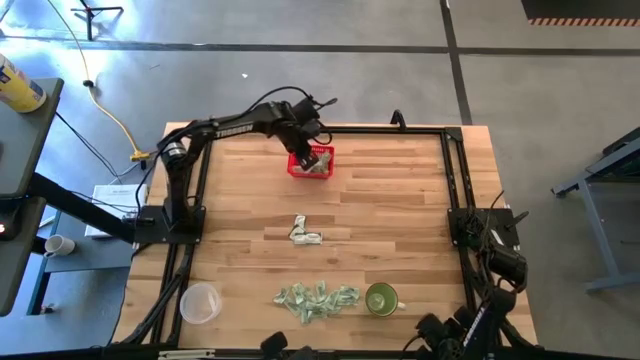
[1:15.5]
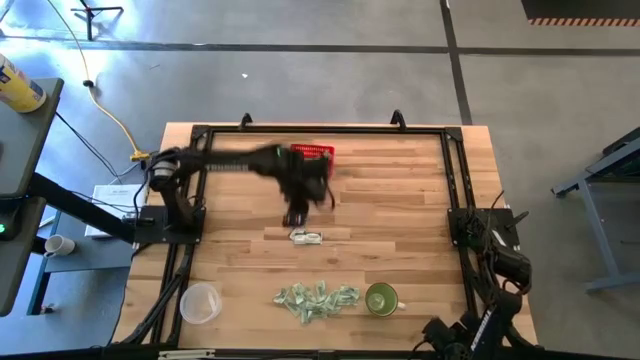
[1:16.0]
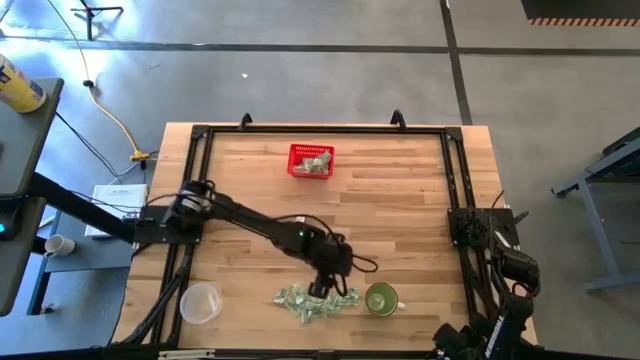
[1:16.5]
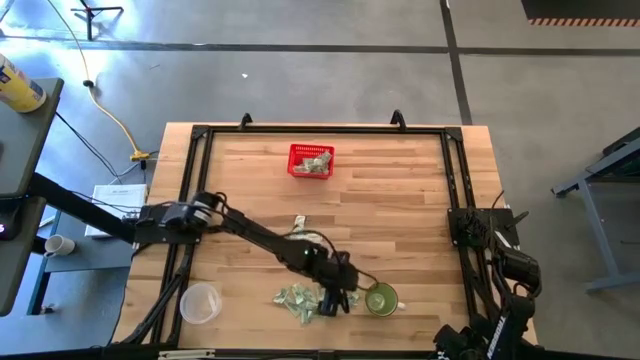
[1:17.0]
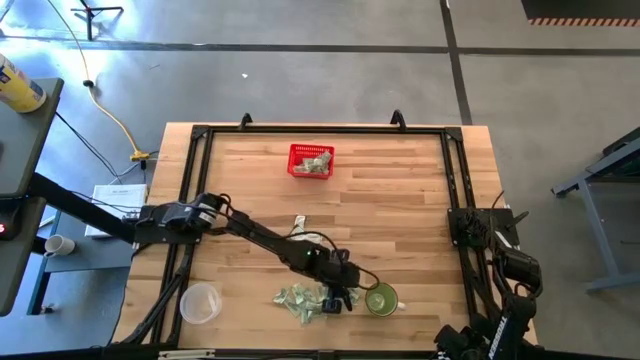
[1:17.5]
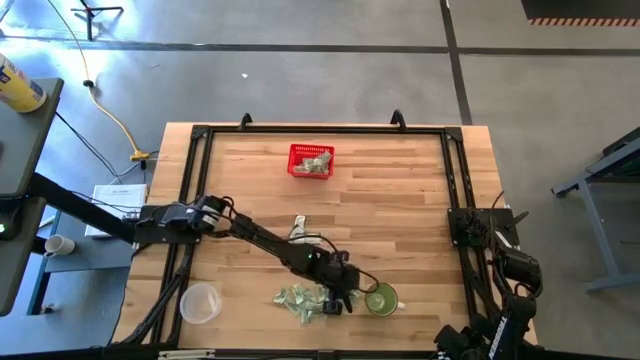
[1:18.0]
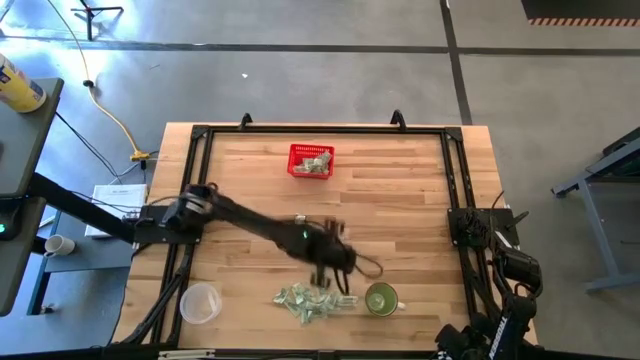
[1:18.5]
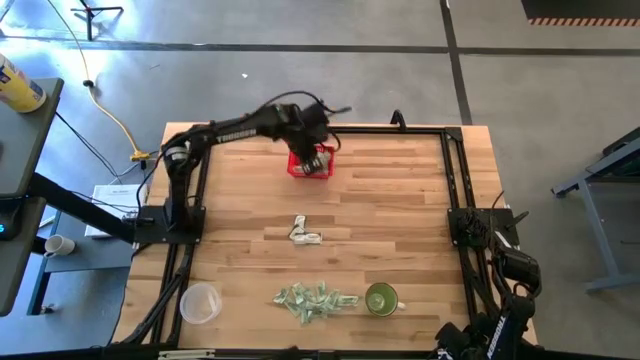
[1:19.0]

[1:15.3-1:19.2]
Task: Pick and place items into bin
Put the light green stevia packet into the red bin

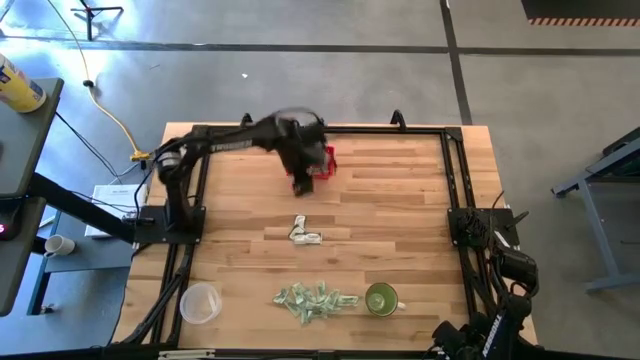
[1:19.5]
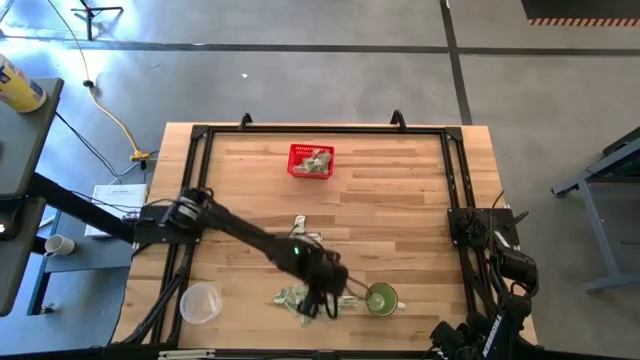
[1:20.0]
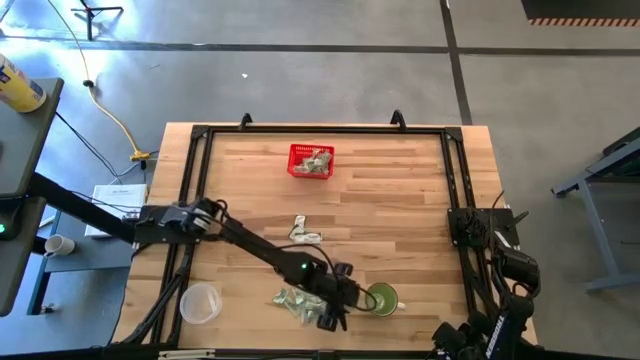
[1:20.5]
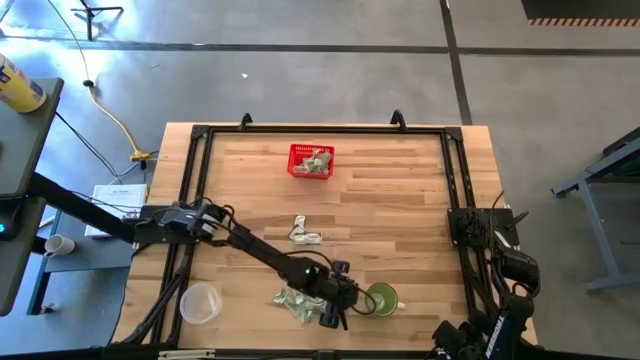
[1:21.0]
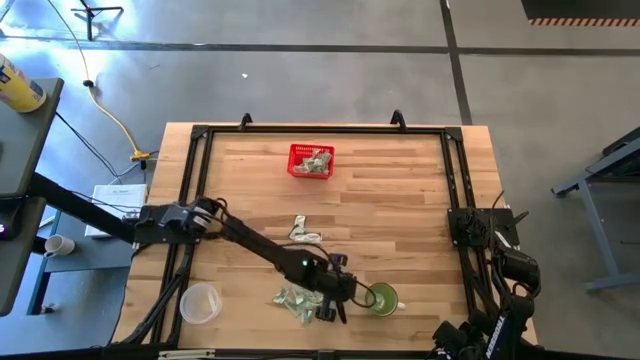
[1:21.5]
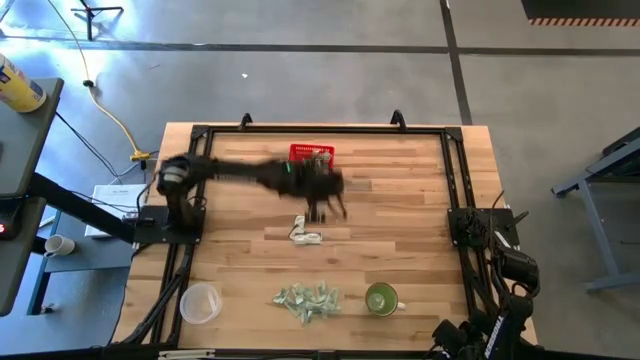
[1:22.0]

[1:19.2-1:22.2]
Put the light green stevia packet into the red bin

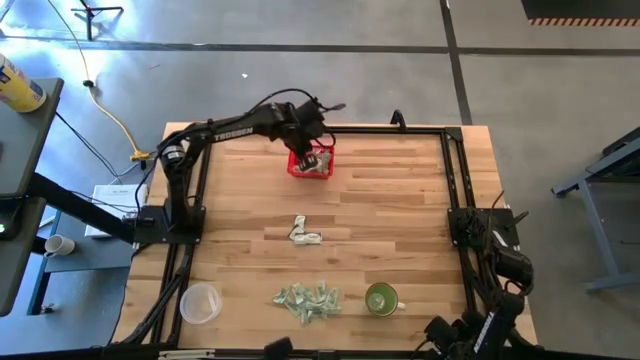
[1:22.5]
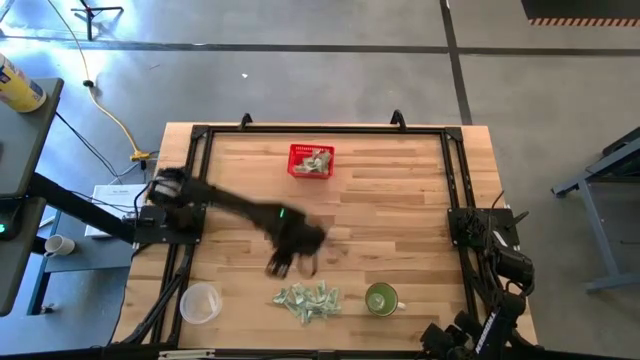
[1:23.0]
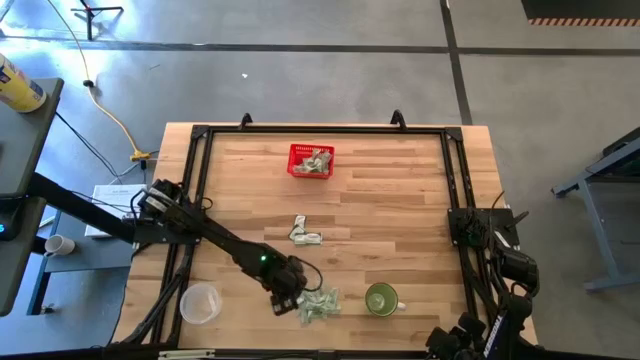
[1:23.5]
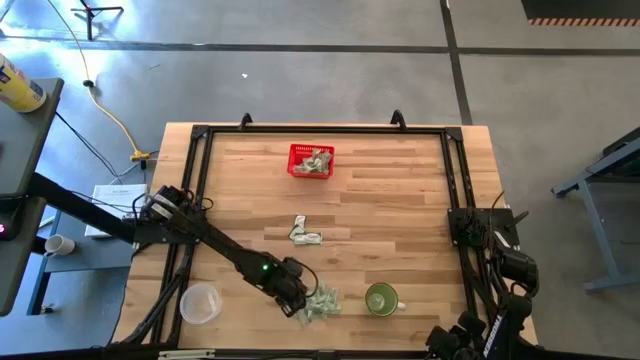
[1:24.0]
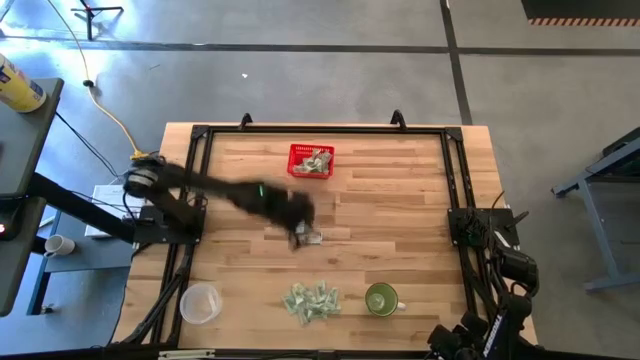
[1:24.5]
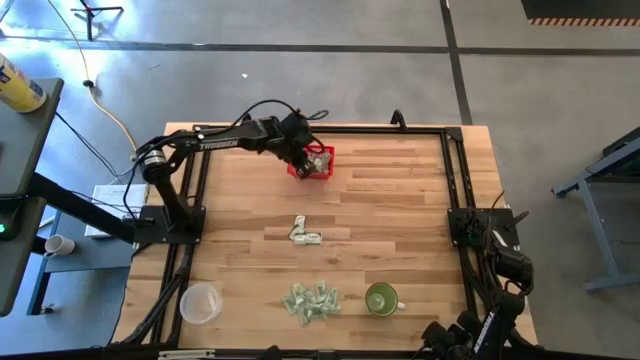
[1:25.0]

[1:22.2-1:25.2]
Put the light green stevia packet into the red bin

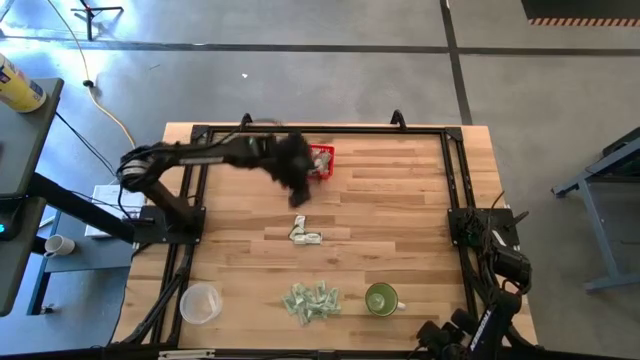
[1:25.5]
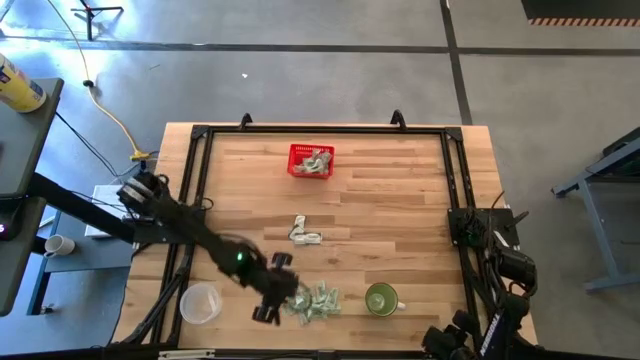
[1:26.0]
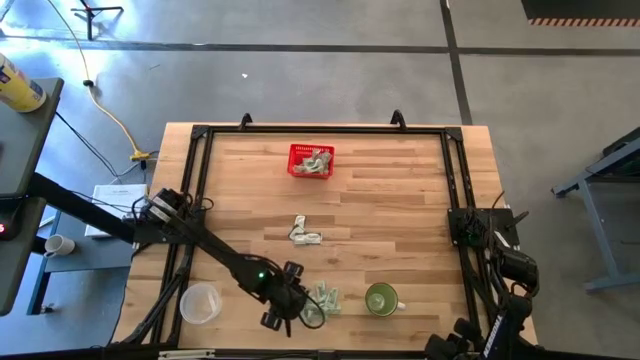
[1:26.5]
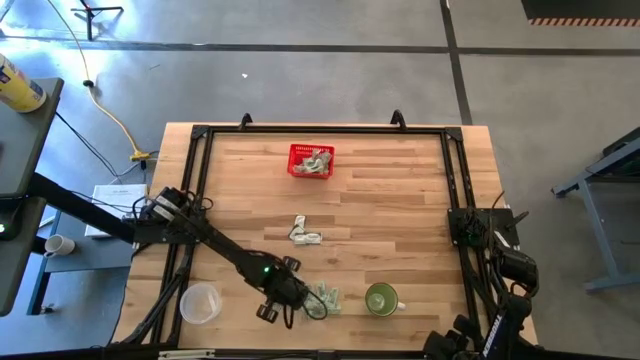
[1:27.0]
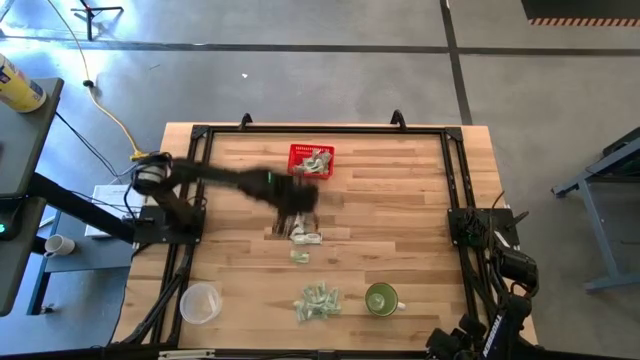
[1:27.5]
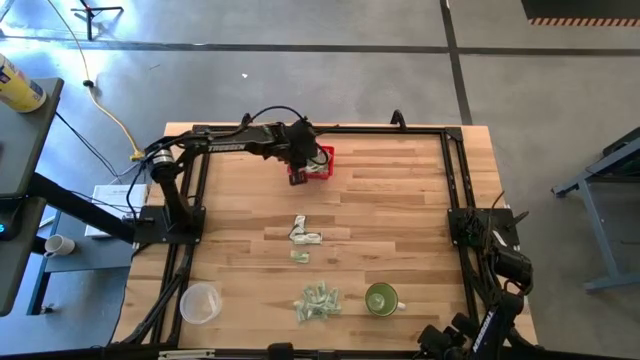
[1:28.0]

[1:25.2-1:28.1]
Put the light green stevia packet into the red bin

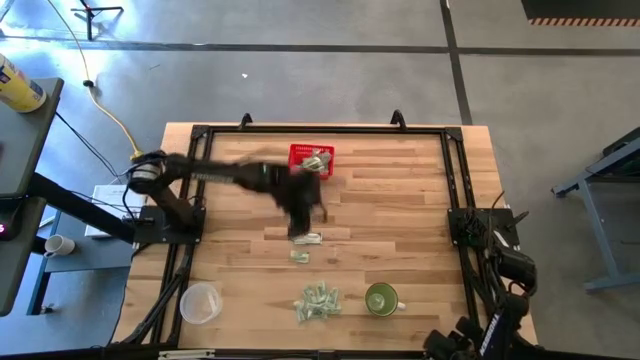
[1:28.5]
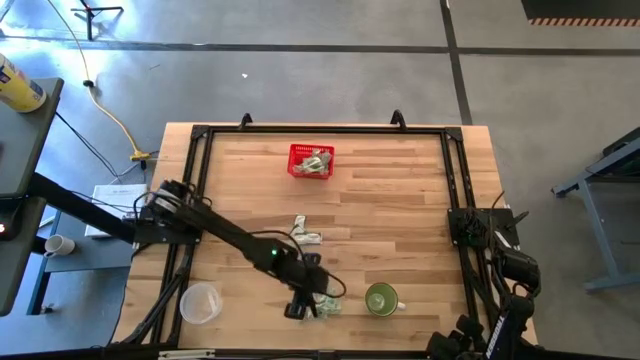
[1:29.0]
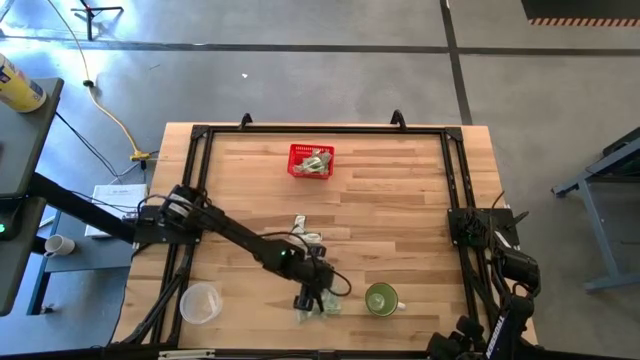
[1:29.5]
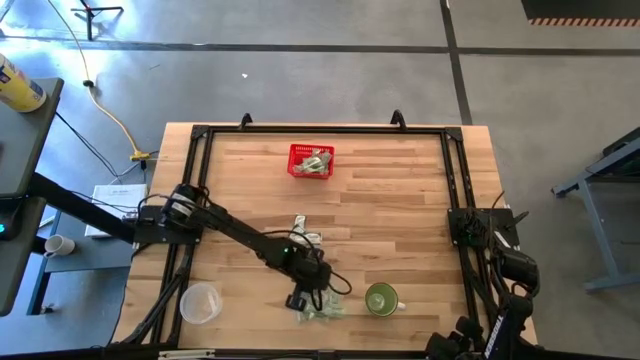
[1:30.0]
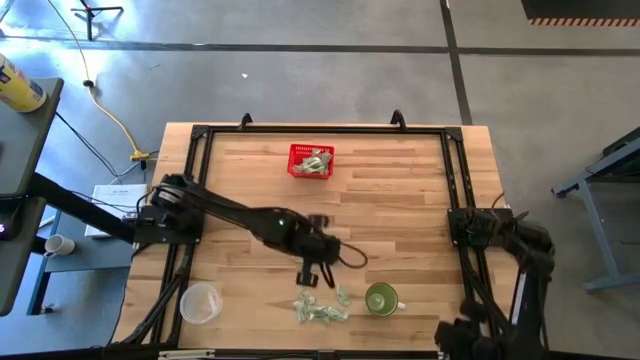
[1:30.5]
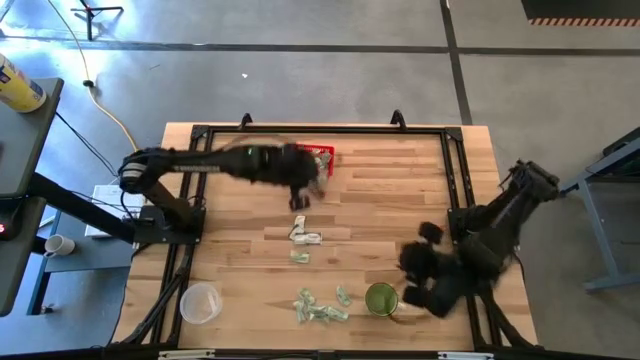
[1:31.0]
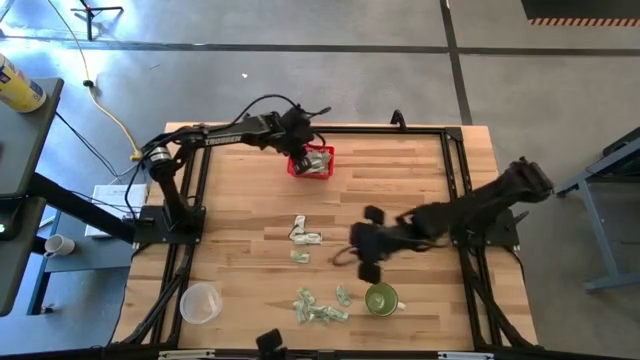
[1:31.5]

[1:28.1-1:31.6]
Put the light green stevia packet into the red bin

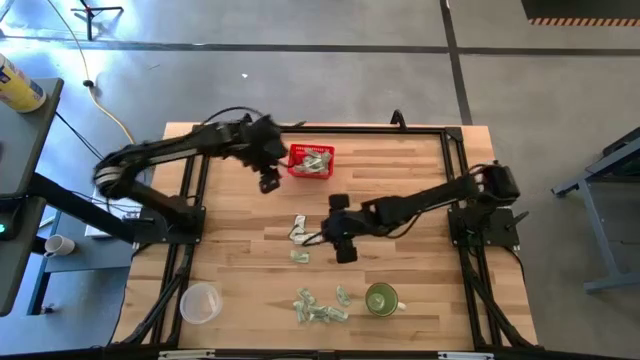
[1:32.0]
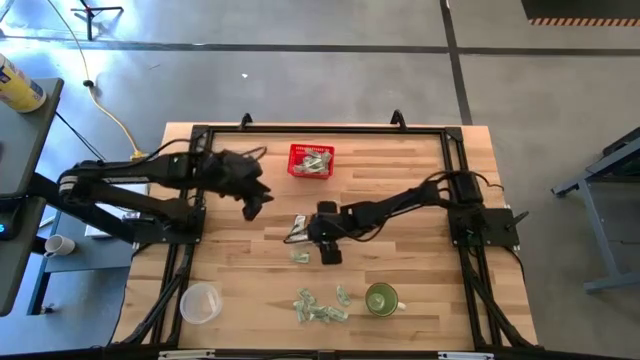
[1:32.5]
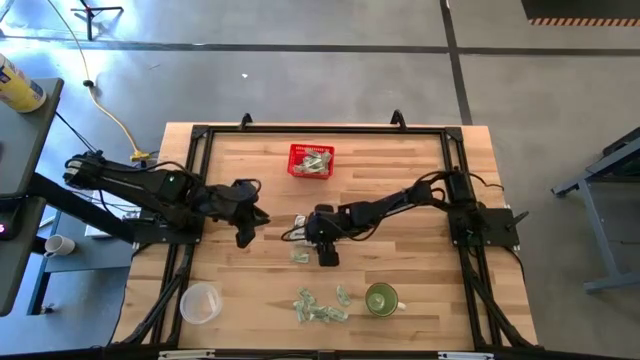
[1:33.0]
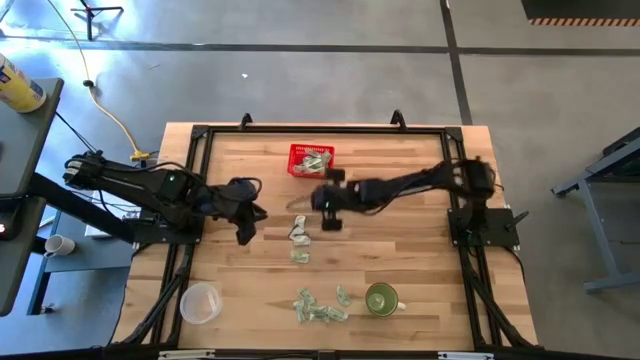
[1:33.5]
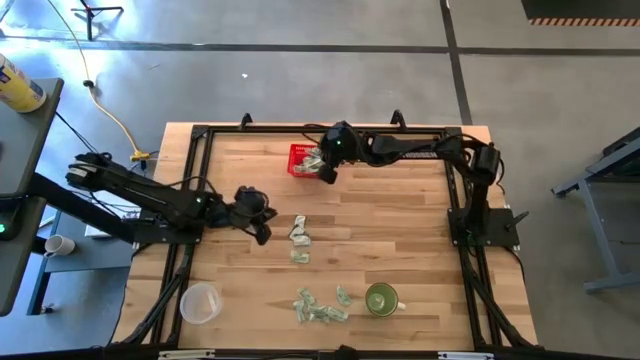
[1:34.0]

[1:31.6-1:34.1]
Put the green stevia packet into the red bin

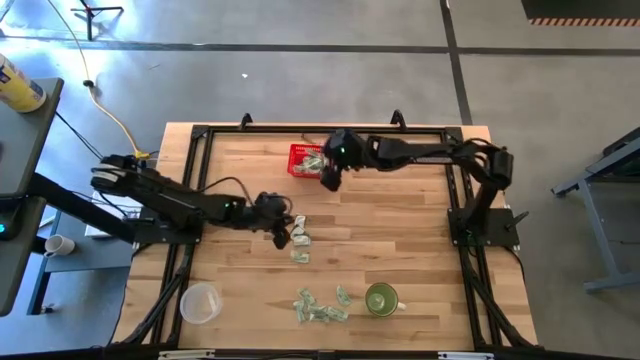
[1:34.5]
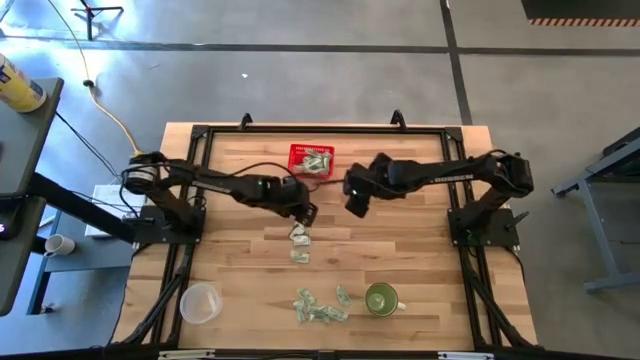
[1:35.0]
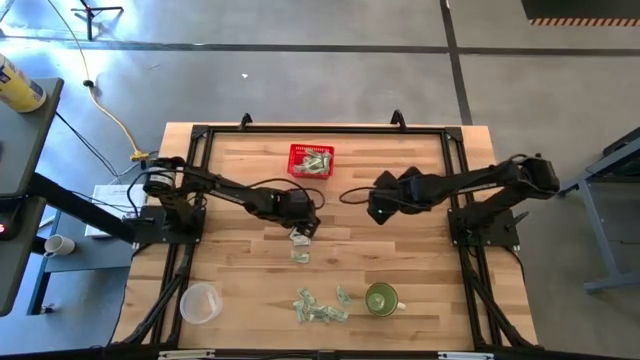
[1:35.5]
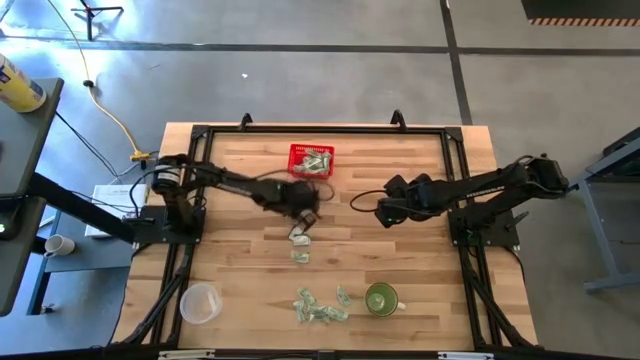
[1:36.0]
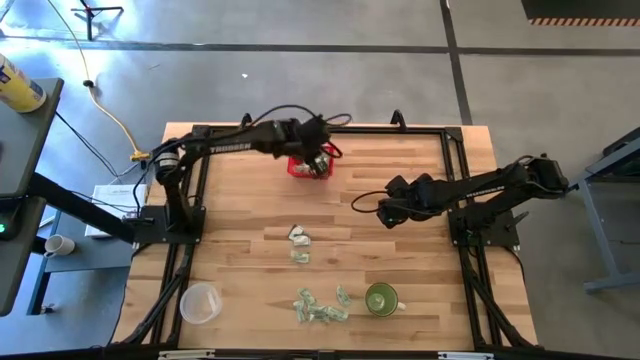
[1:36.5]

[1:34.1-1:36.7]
Put the top green stevia packet into the red bin

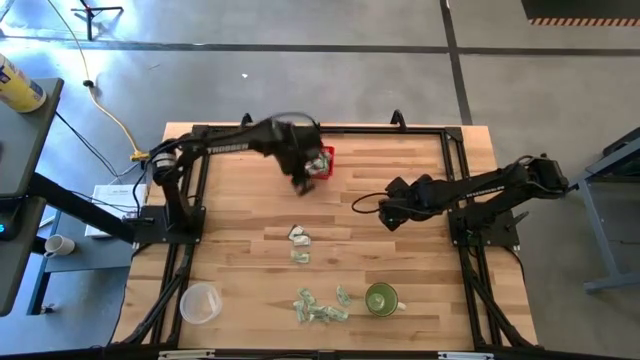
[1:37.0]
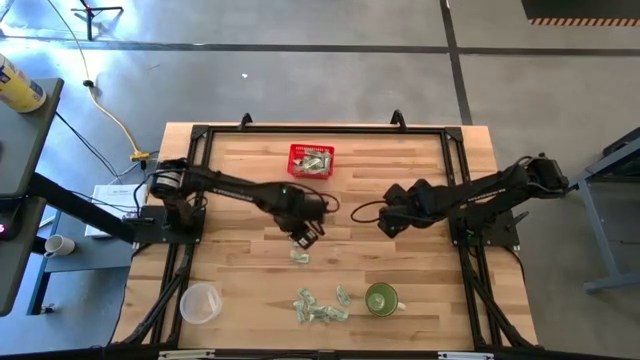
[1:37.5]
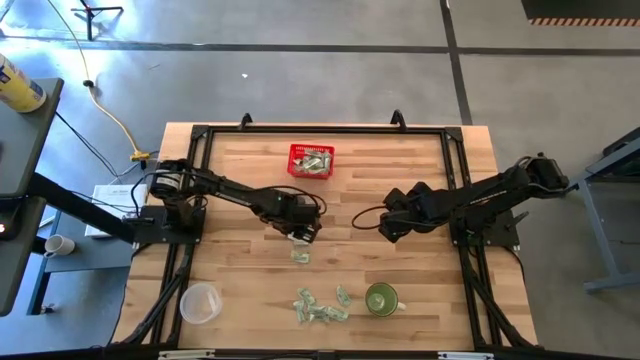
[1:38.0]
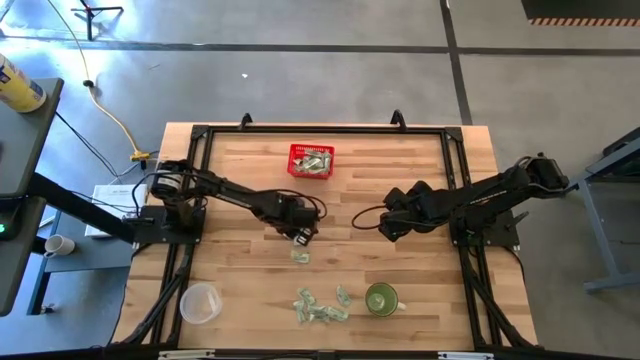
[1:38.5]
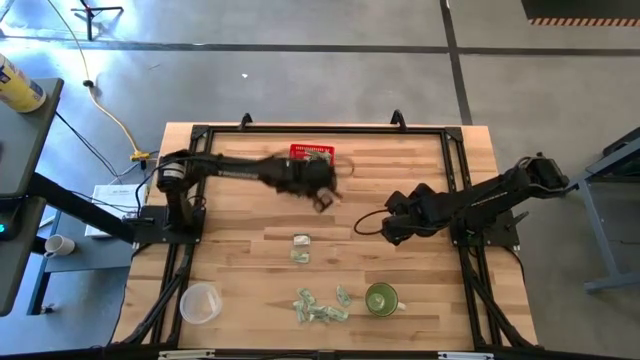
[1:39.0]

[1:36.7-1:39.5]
Put the top green stevia packet into the red bin
